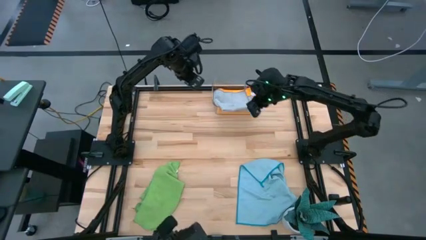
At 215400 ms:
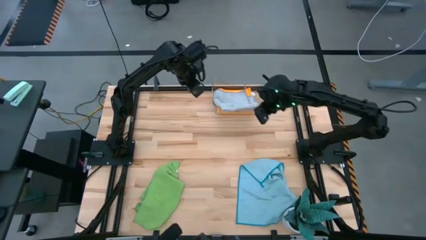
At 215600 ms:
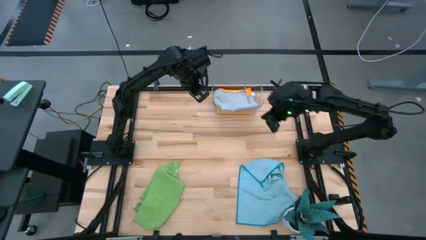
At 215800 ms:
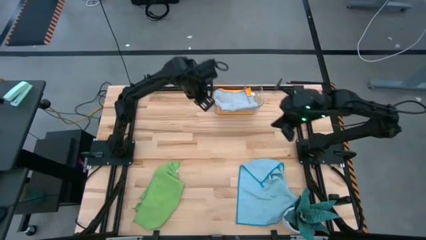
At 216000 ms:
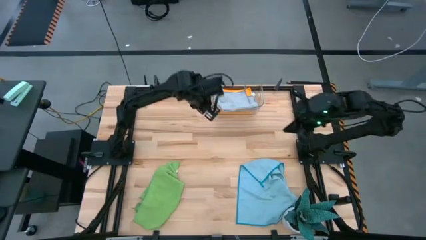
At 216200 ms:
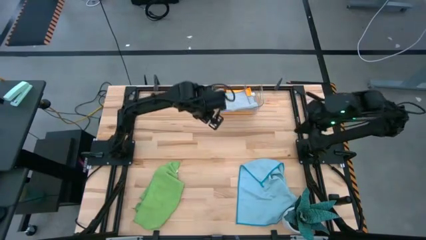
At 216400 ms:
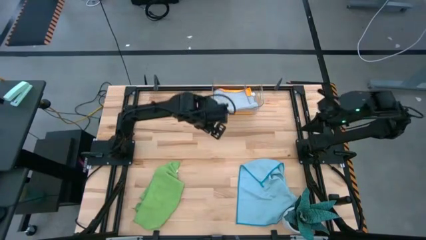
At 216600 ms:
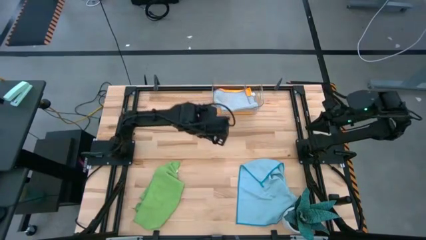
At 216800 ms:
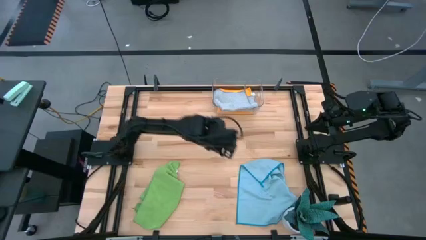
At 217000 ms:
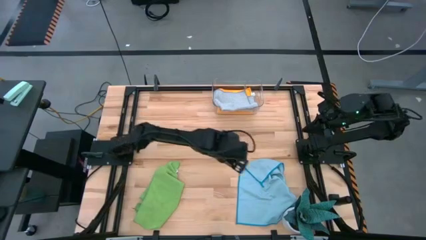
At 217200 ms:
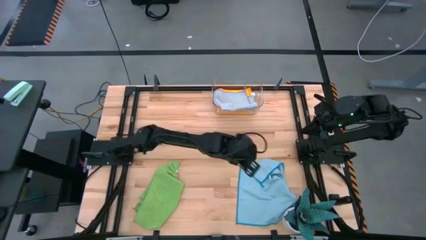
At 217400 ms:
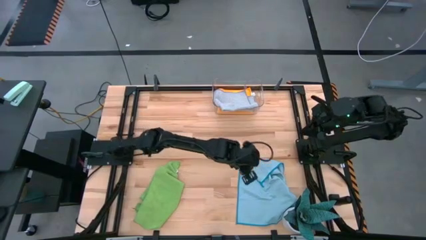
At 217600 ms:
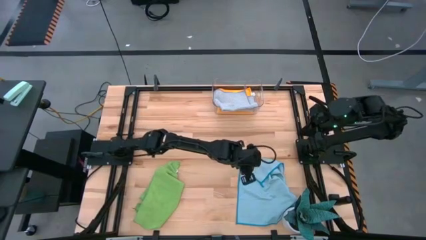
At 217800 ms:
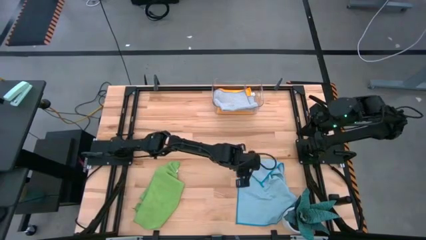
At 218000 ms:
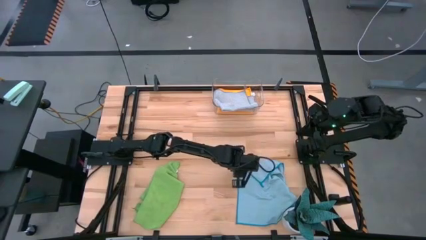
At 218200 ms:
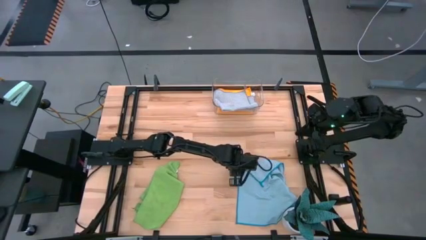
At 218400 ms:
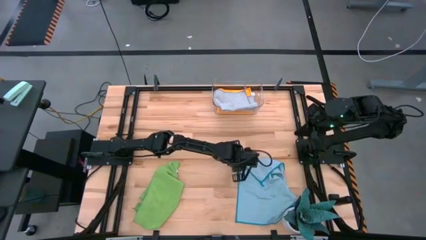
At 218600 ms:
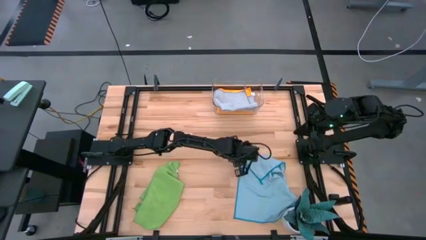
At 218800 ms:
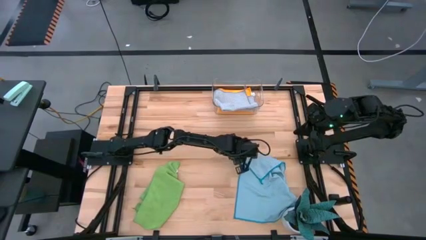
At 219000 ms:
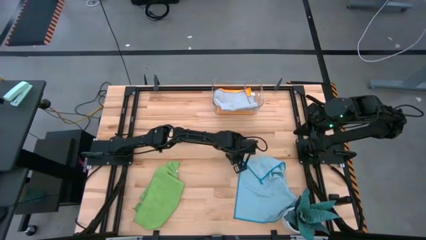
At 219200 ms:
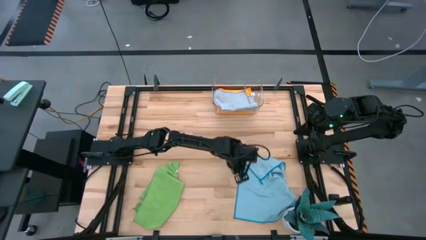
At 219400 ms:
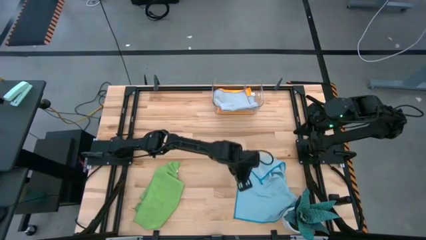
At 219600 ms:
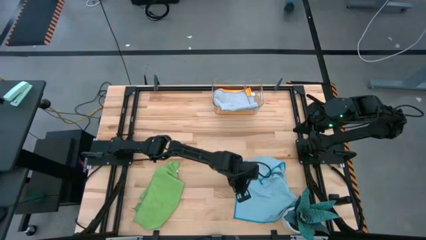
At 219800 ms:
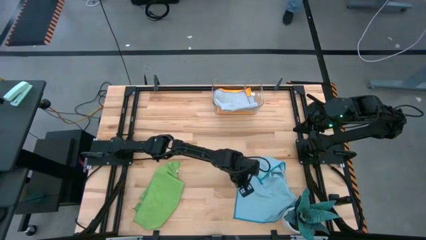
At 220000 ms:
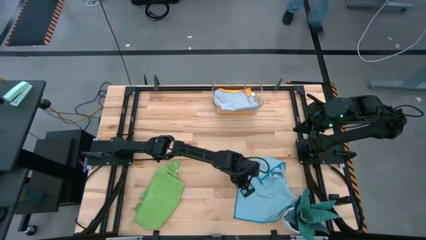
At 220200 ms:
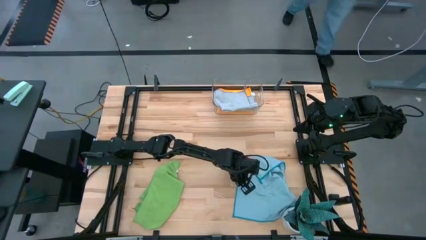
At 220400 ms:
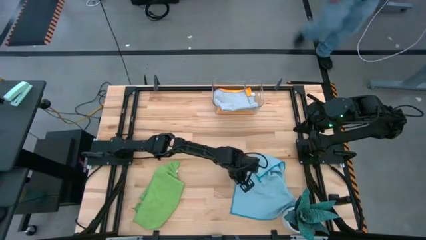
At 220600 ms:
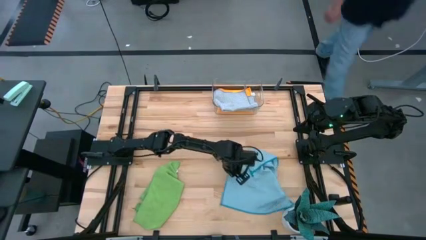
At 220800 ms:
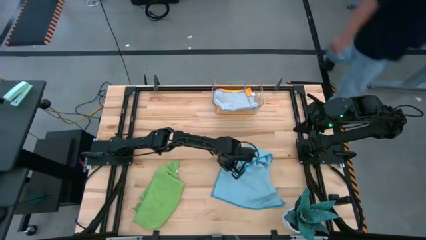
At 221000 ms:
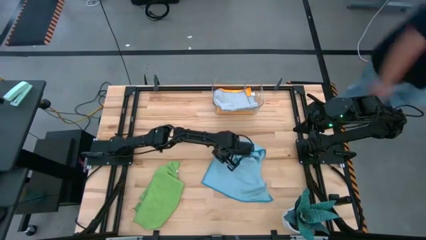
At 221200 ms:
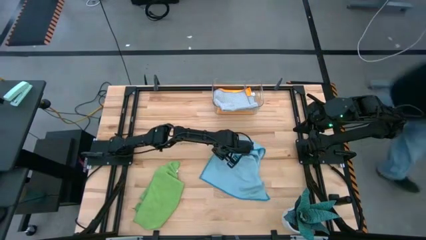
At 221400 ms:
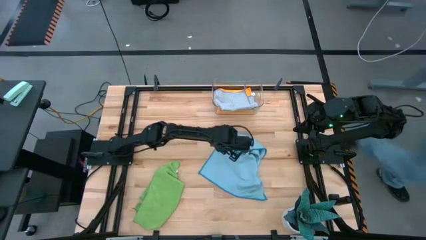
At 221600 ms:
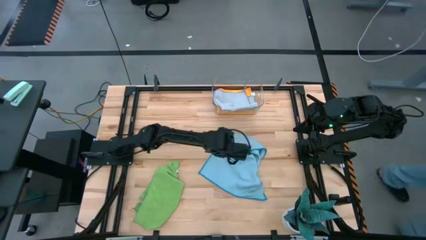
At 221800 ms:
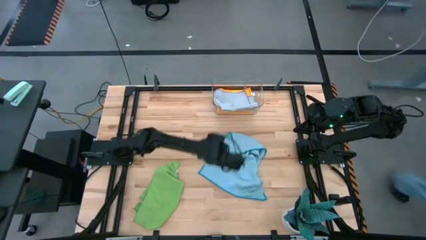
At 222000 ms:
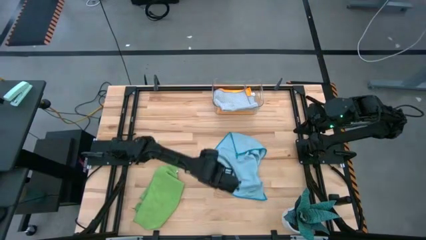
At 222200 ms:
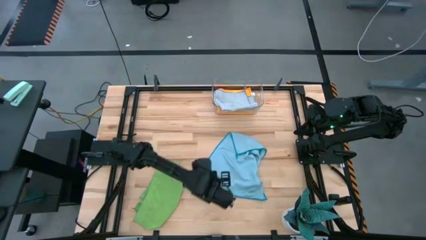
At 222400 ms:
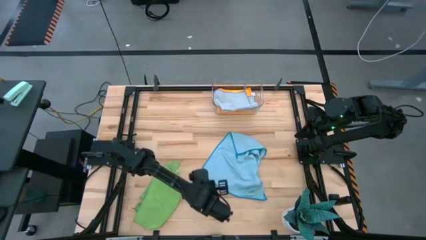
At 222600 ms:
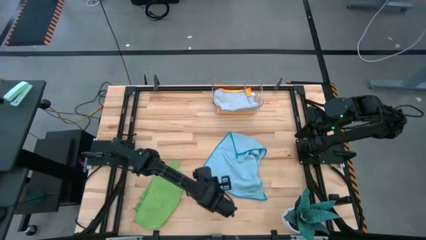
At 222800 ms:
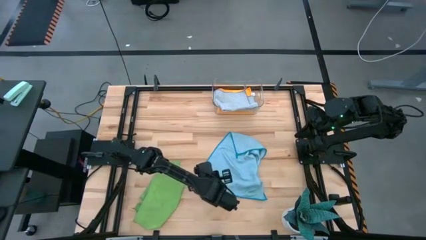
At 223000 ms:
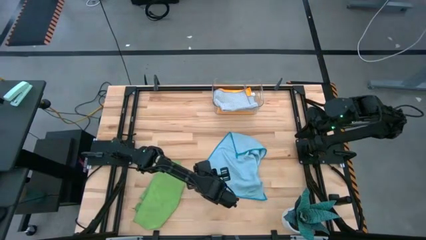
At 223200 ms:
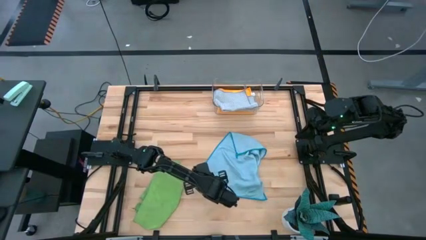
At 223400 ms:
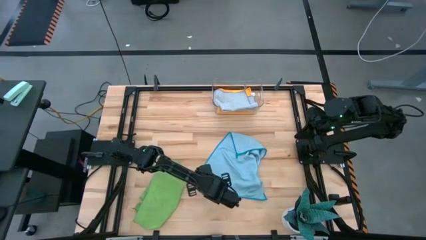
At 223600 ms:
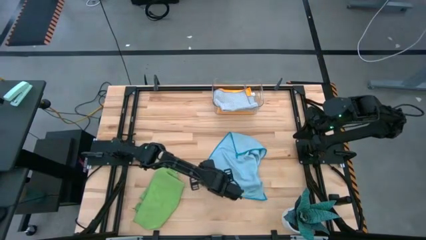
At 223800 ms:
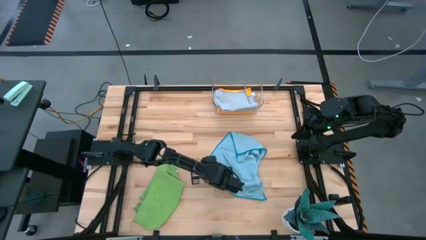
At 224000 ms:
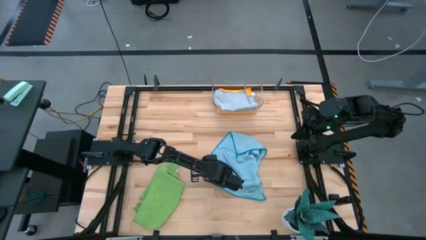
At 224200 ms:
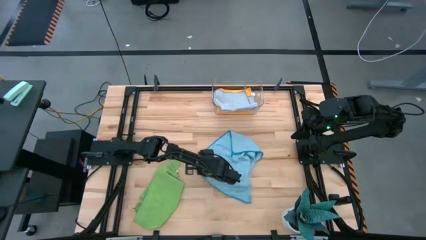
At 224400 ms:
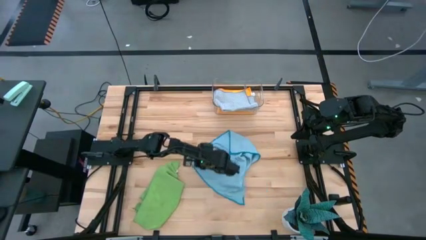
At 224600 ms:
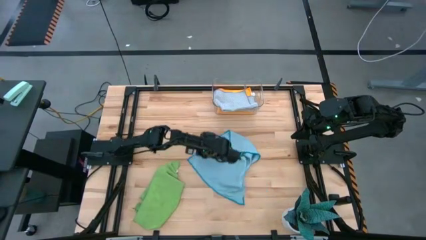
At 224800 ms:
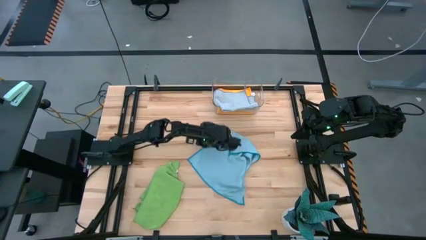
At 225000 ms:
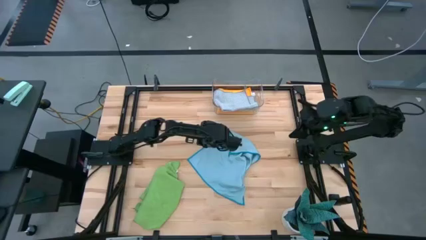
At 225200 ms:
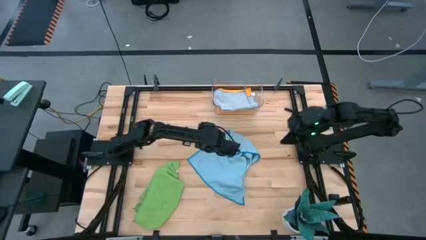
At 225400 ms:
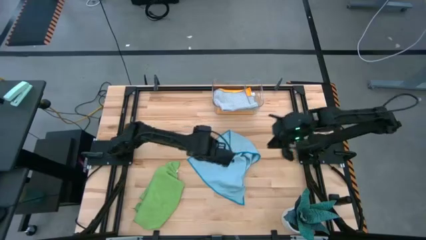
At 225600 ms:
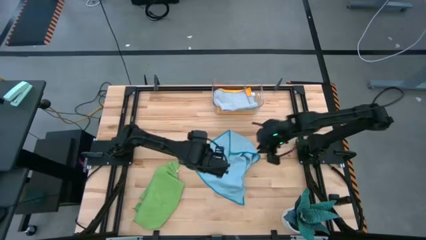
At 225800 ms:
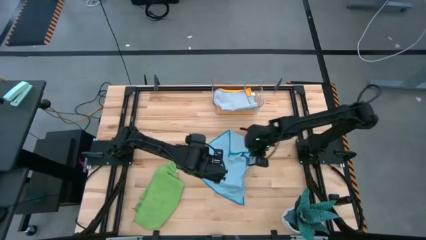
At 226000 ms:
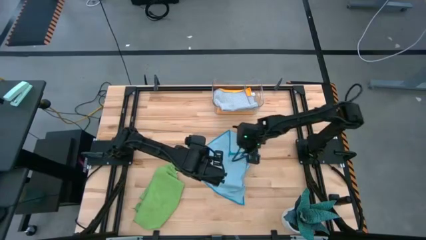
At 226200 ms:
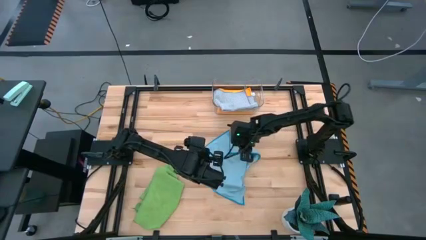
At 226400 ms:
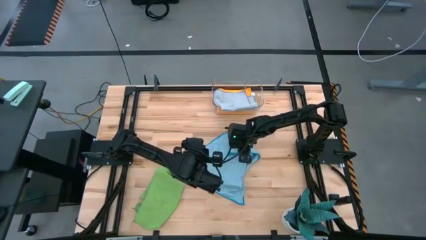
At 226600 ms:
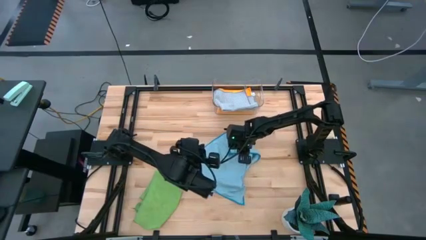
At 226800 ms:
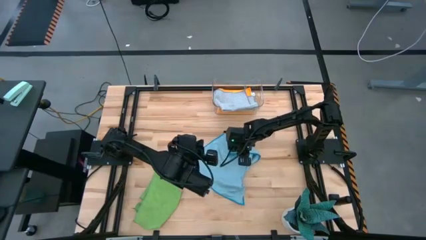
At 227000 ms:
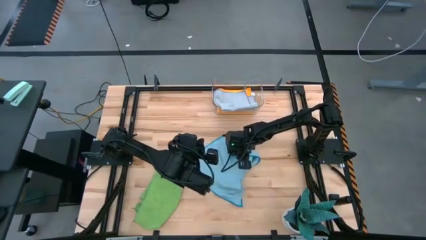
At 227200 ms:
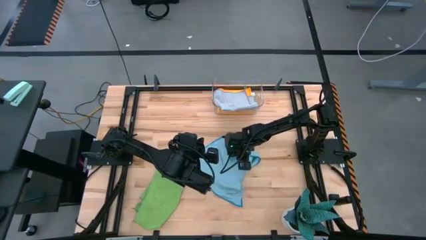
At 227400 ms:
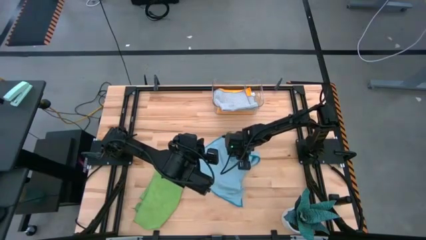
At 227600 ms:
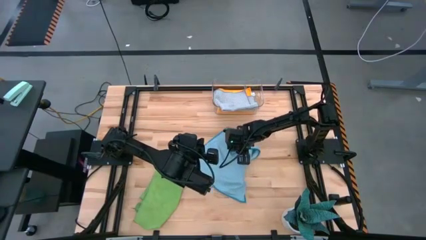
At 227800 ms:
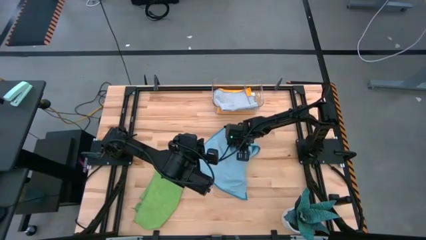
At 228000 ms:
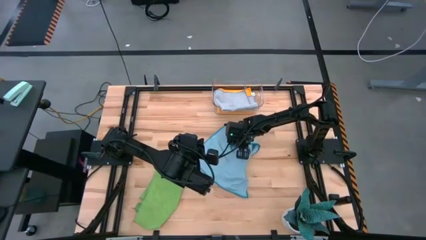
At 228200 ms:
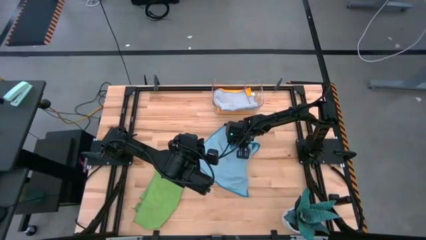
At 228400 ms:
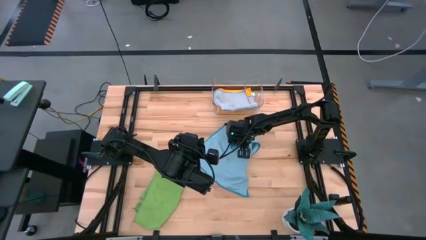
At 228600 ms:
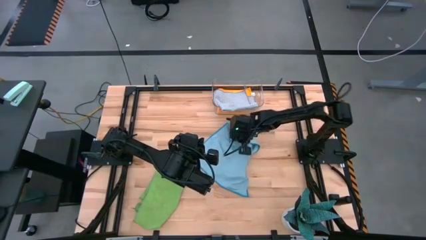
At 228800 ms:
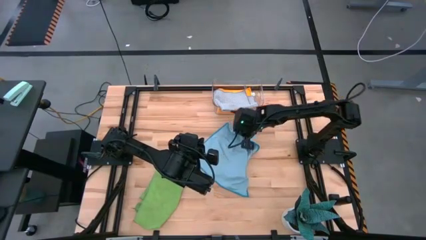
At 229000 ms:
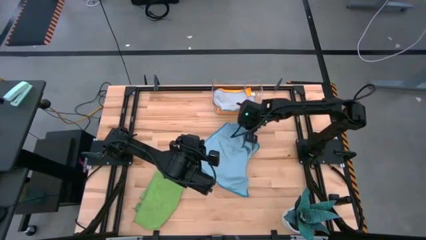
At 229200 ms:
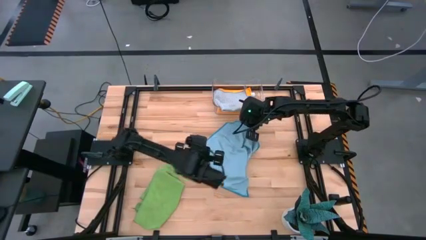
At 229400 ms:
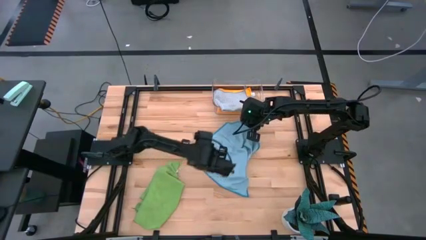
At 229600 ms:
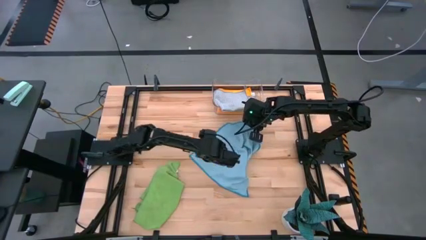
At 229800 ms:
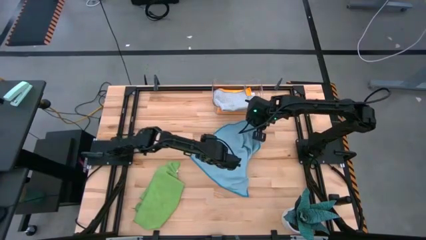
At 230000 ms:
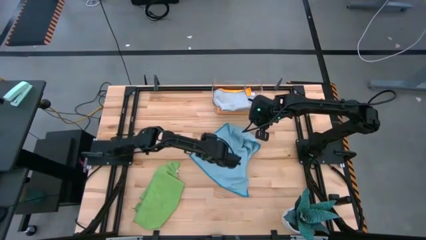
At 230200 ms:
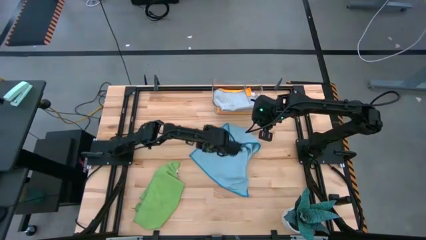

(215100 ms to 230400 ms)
Task: Fold microfiber towels
Fold the blue microfiber cloth
